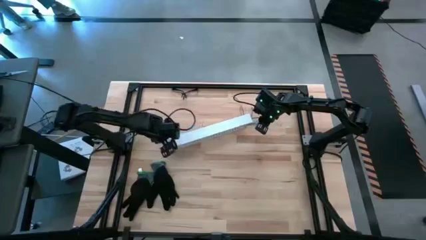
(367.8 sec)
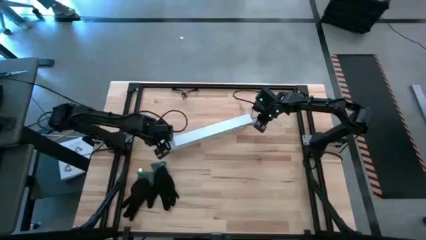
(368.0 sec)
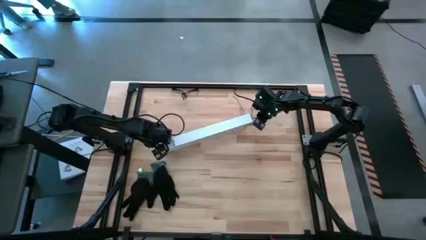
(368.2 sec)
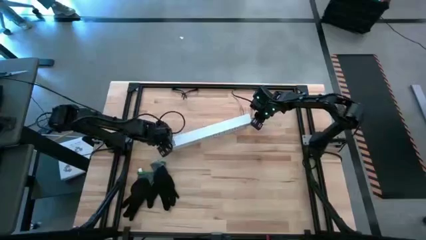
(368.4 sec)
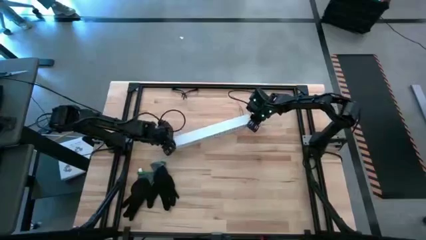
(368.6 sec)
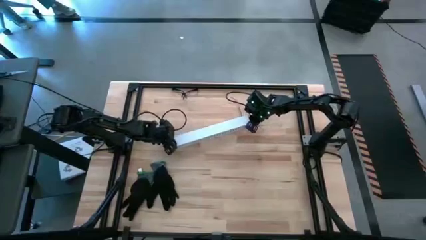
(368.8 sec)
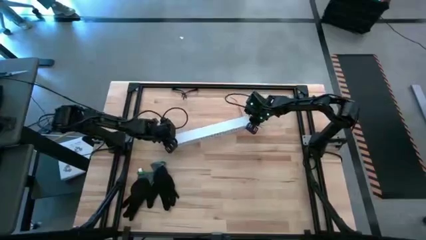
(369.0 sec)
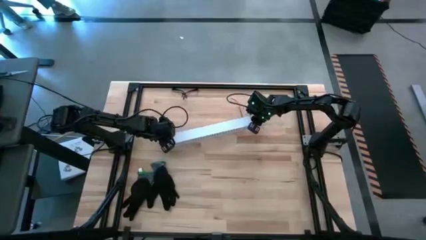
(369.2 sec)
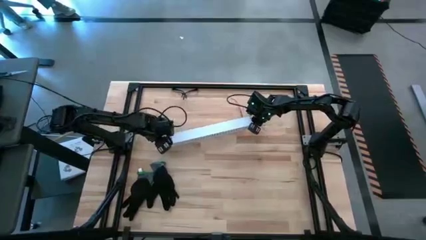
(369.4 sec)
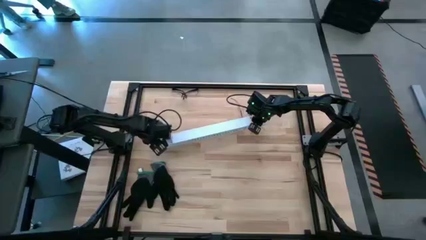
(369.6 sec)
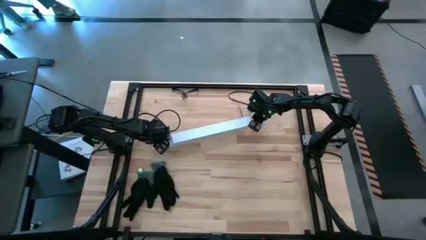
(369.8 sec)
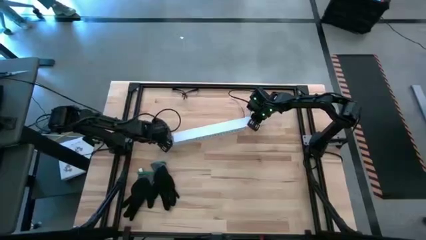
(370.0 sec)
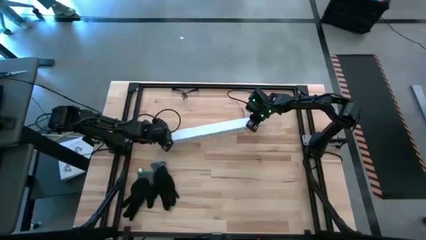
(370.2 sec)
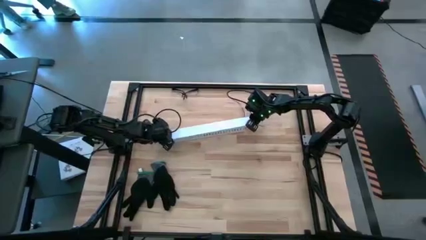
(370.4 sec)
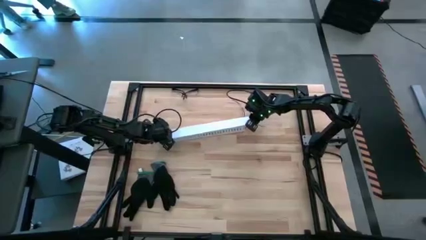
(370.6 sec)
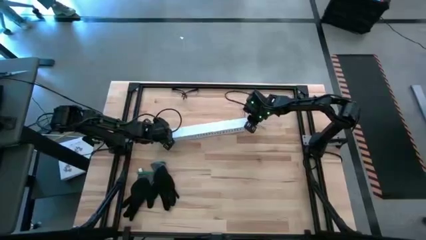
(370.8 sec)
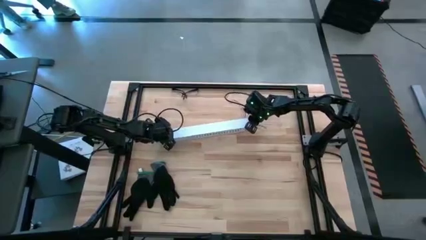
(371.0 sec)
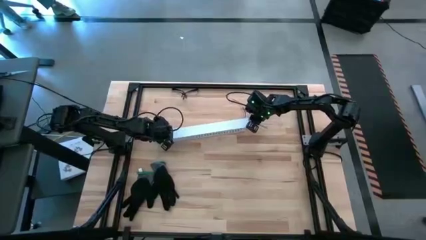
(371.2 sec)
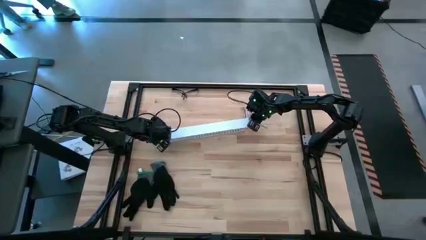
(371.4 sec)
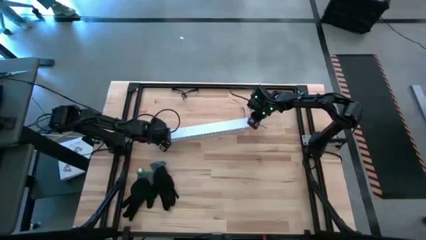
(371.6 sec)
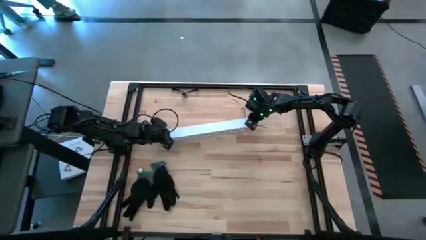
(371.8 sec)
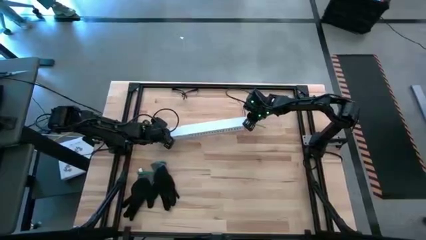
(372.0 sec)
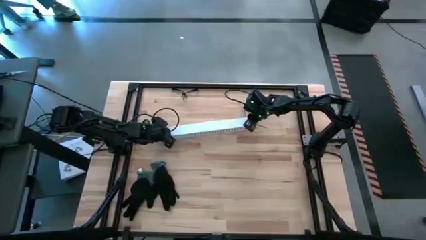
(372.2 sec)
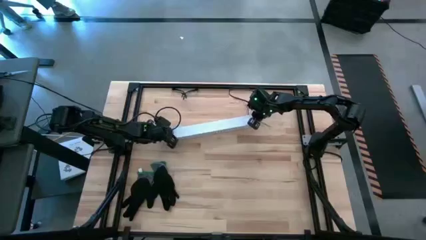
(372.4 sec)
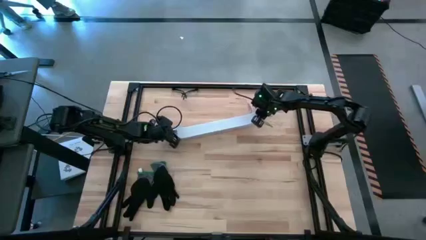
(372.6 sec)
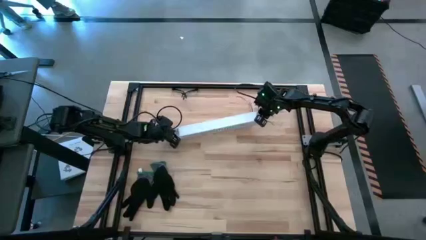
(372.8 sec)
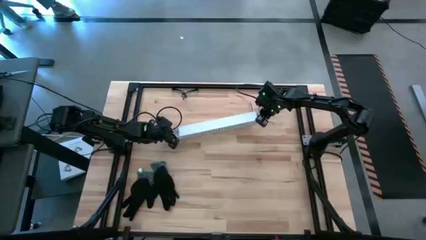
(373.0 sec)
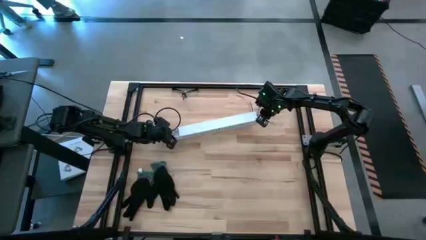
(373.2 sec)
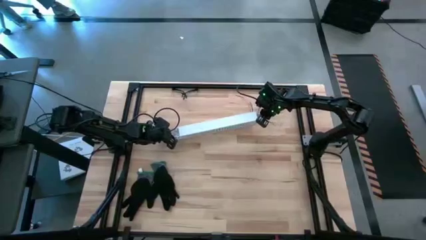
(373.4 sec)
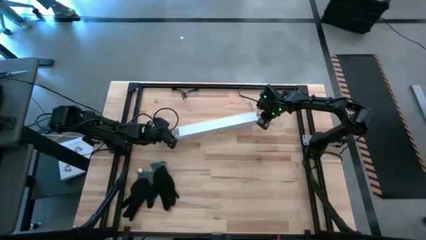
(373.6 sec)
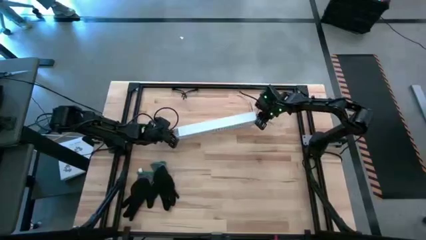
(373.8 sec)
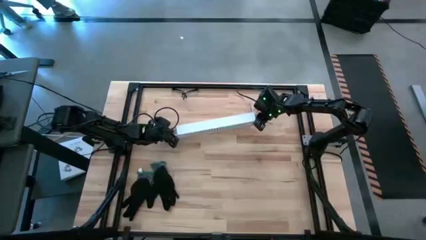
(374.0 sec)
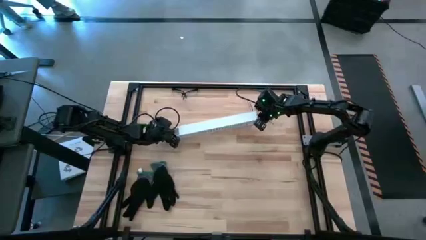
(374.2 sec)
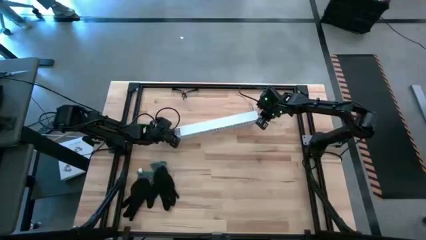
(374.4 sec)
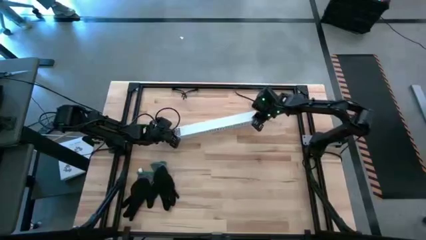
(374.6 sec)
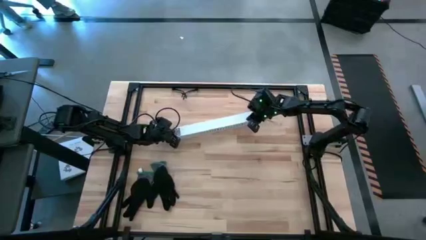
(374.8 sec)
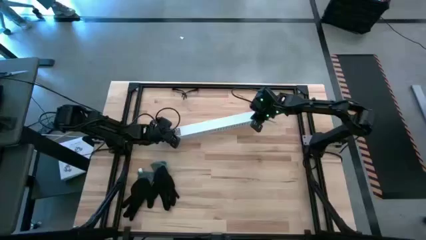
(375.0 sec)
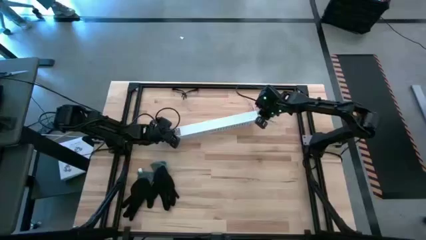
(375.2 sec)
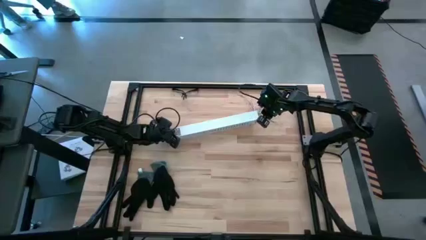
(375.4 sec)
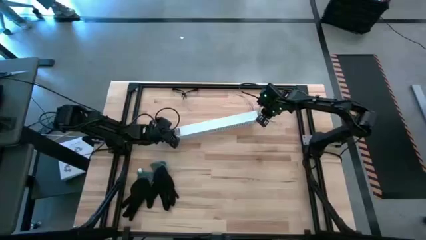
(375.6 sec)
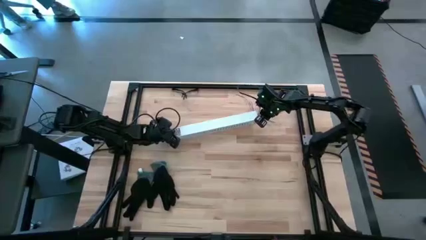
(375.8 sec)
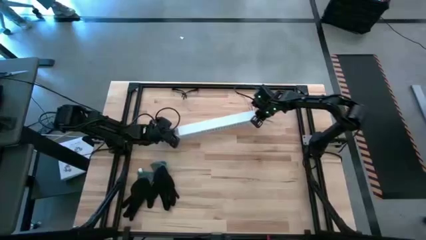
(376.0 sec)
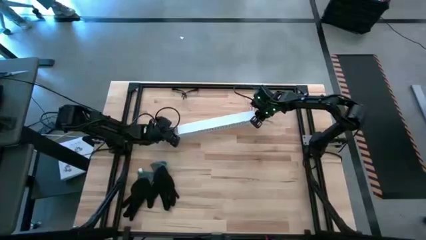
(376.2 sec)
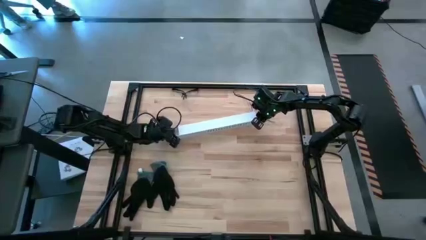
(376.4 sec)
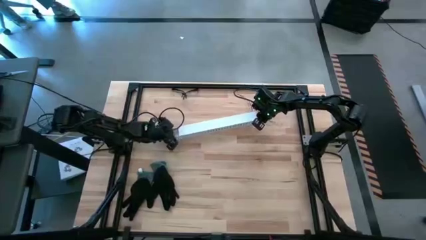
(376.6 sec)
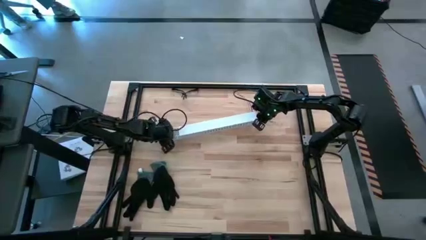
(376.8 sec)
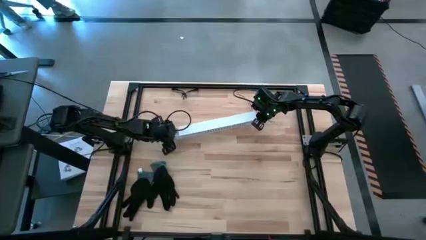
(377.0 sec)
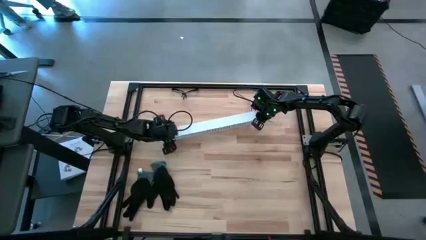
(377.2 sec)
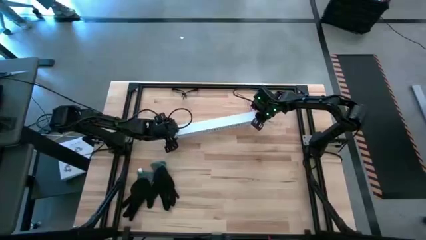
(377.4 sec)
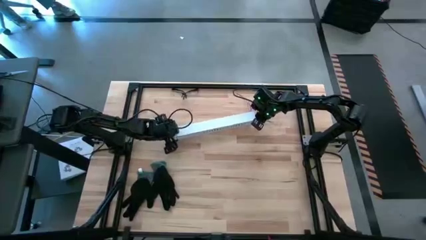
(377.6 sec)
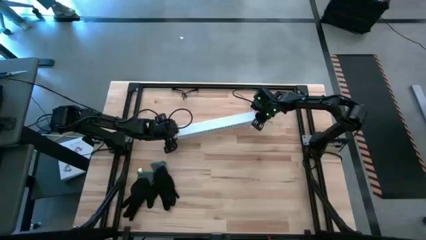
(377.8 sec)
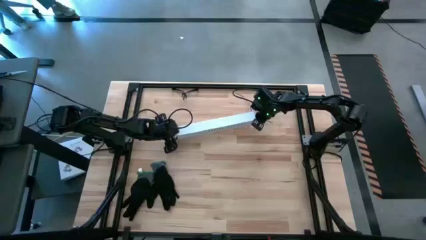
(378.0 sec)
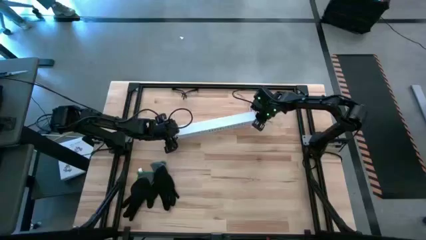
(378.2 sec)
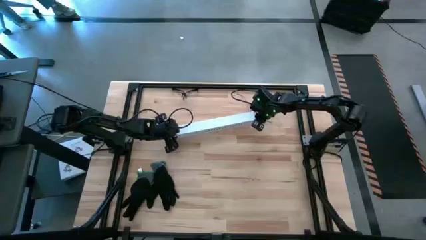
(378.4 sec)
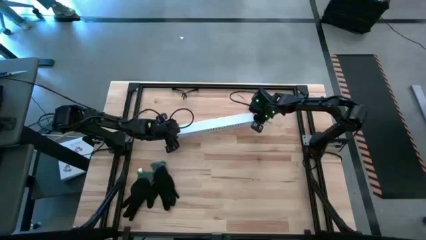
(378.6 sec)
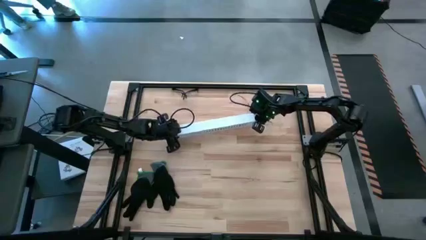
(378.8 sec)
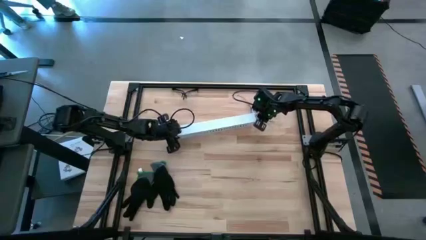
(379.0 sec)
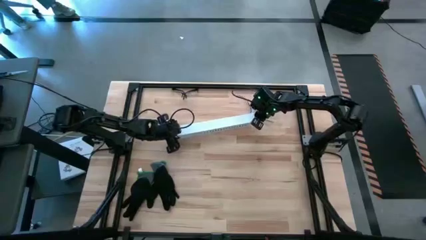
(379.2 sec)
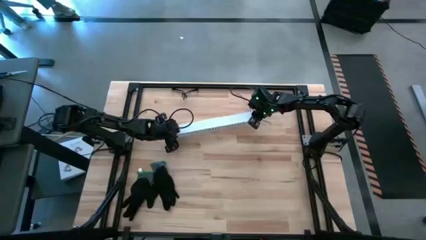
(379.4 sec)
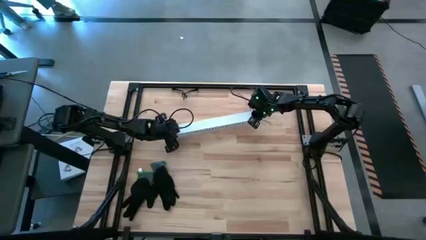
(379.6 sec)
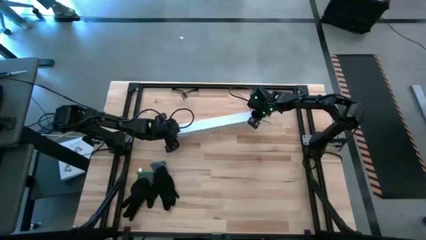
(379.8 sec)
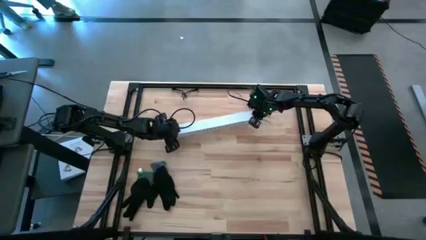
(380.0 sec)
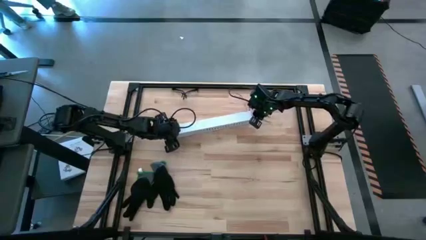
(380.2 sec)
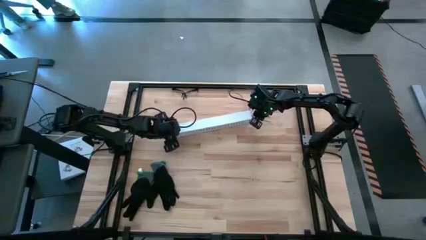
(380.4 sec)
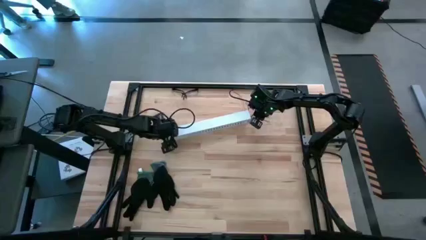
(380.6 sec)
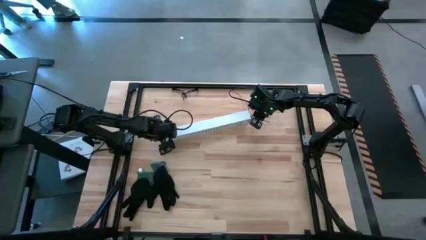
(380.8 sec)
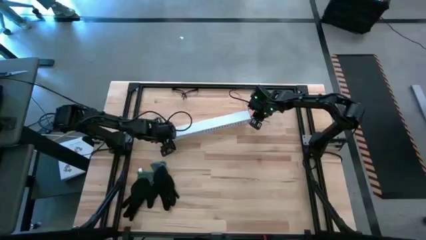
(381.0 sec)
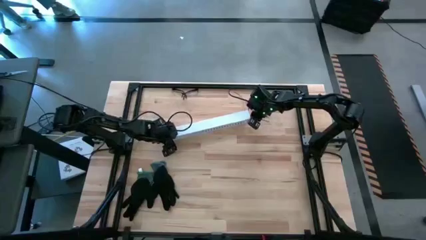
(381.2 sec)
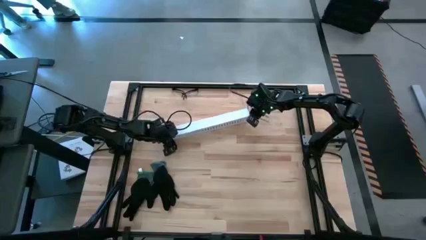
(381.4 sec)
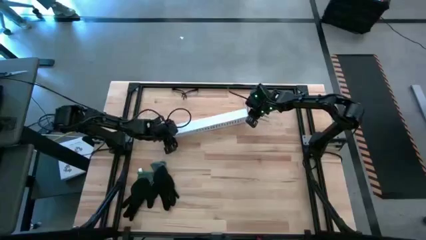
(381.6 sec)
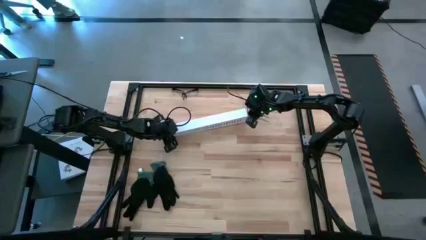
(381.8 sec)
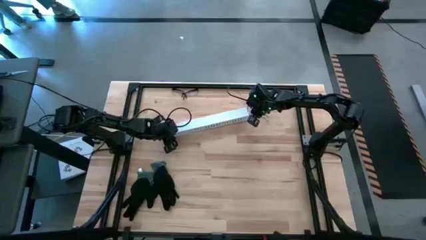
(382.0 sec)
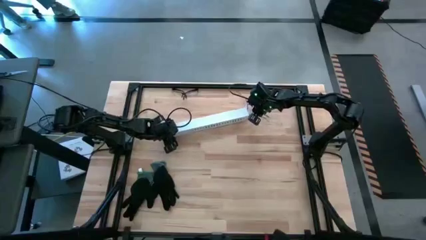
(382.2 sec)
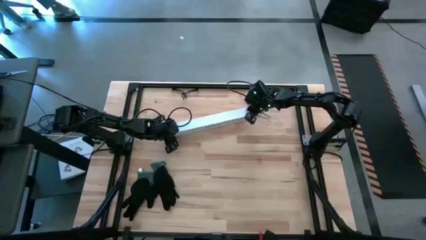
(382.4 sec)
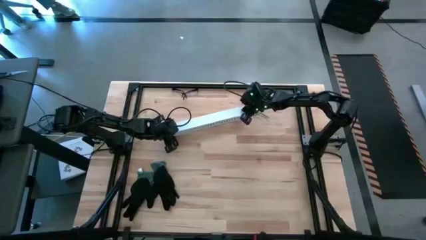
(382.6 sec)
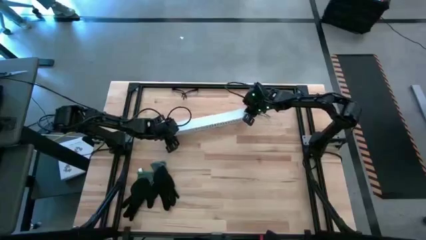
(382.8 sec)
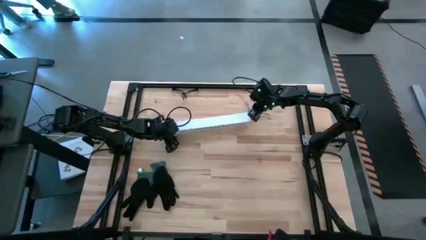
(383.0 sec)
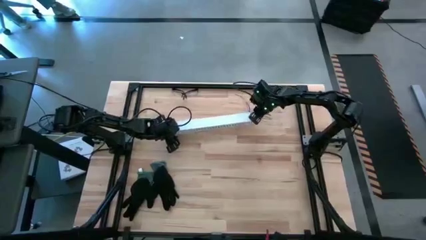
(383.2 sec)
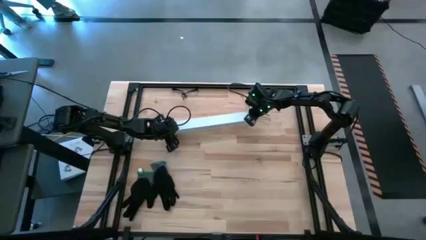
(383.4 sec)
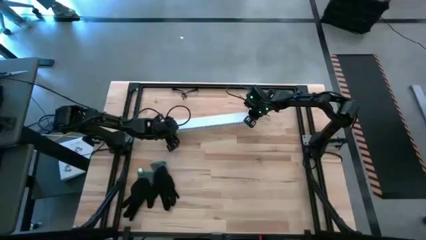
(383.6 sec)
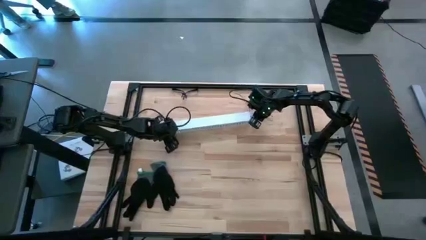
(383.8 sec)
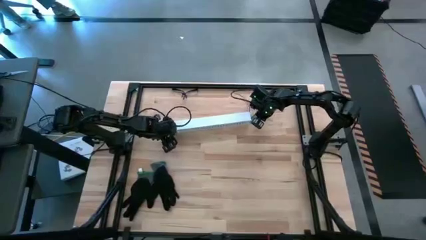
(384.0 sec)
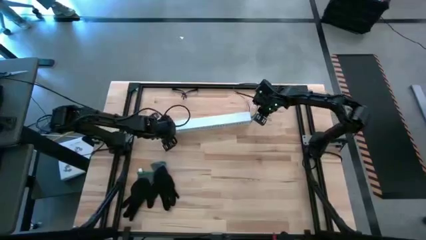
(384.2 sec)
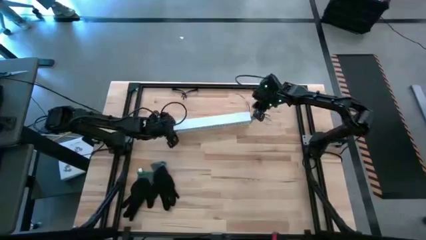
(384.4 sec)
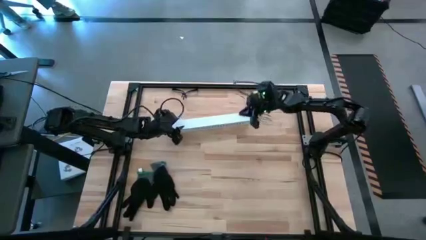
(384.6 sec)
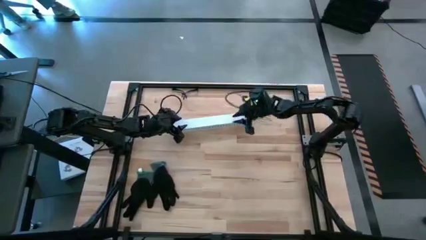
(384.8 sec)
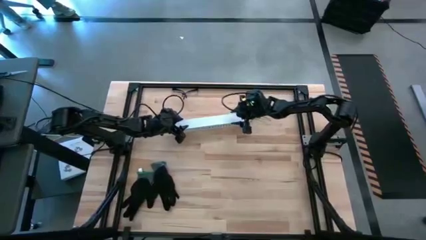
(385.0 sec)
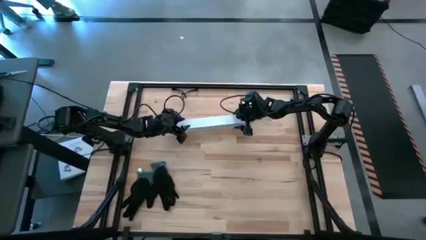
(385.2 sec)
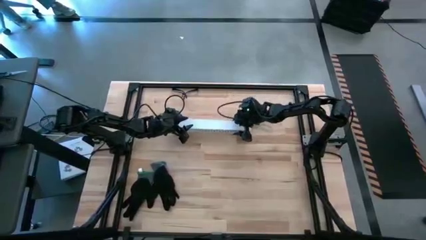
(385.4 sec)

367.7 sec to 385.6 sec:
Task: Ziptie cables
Close the white cable duct
